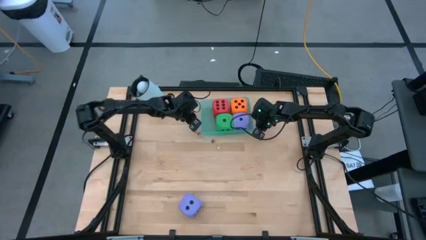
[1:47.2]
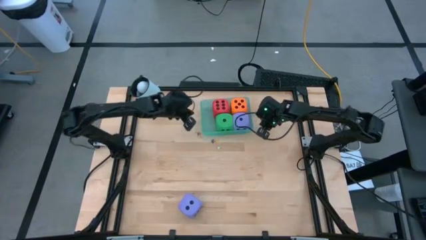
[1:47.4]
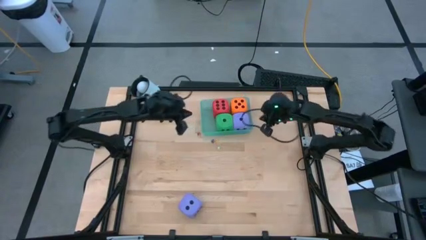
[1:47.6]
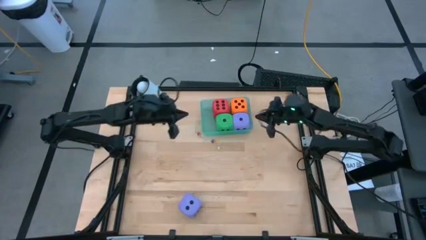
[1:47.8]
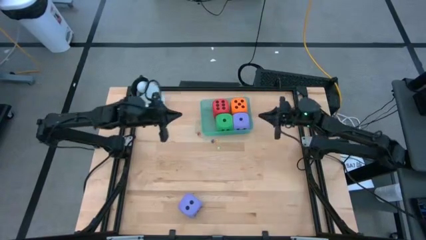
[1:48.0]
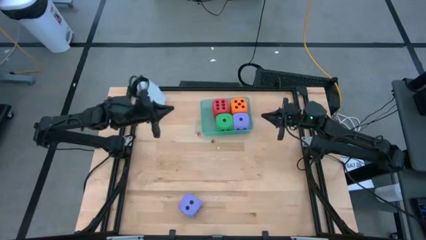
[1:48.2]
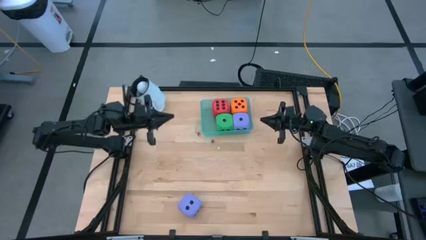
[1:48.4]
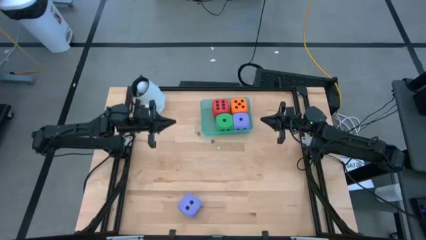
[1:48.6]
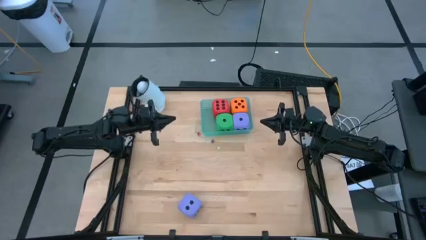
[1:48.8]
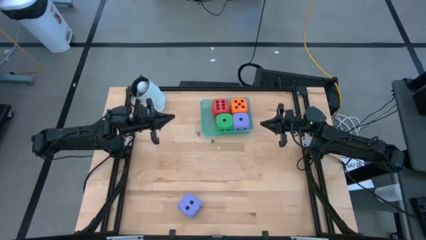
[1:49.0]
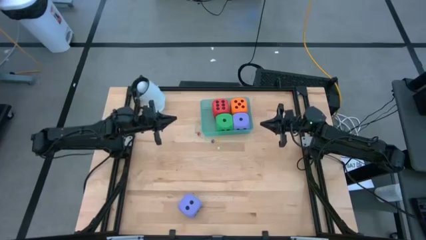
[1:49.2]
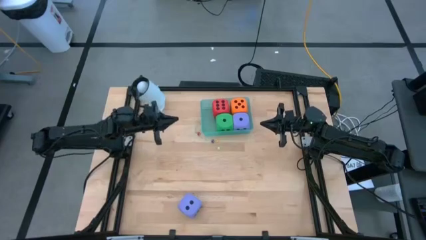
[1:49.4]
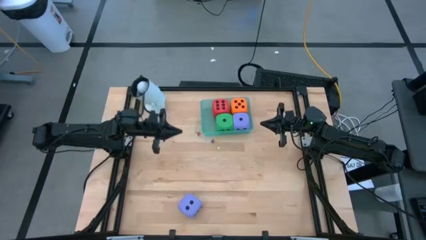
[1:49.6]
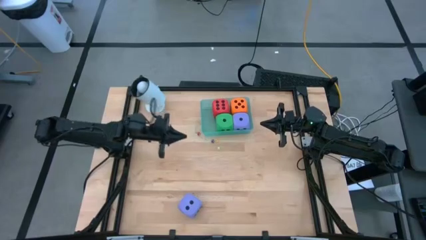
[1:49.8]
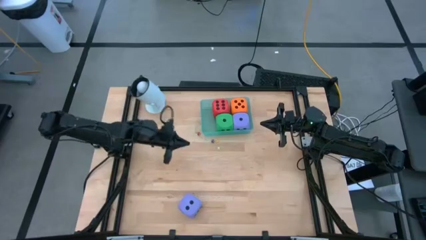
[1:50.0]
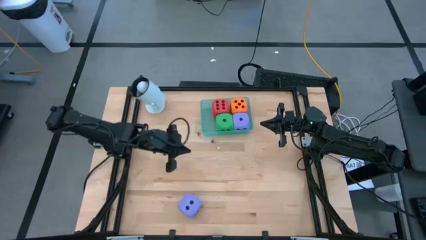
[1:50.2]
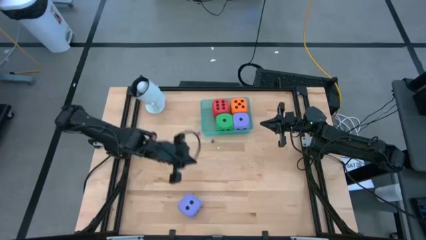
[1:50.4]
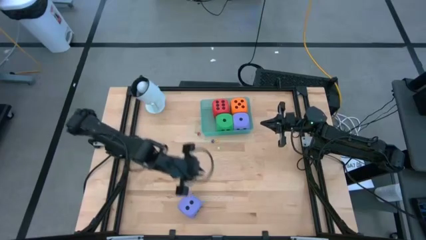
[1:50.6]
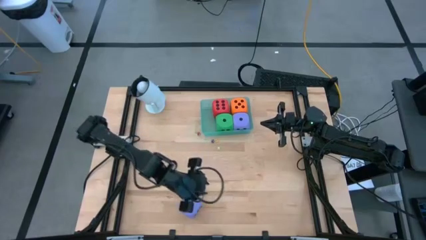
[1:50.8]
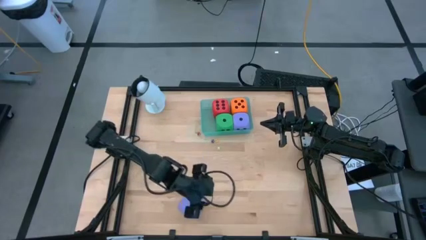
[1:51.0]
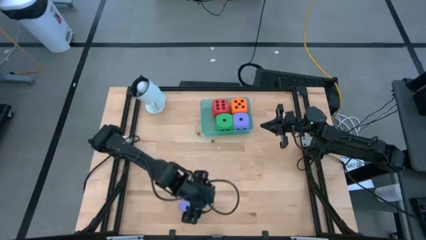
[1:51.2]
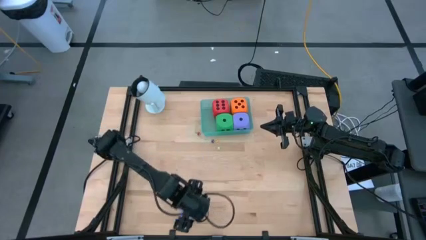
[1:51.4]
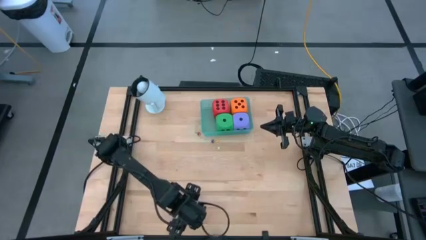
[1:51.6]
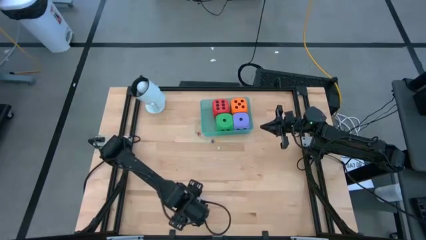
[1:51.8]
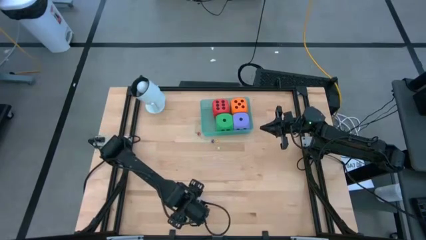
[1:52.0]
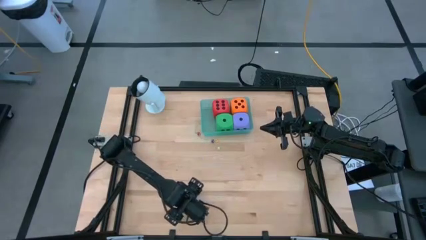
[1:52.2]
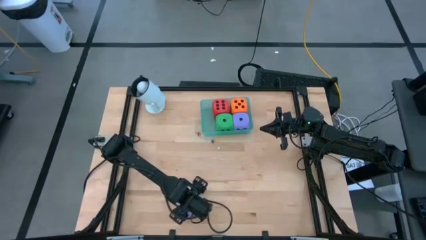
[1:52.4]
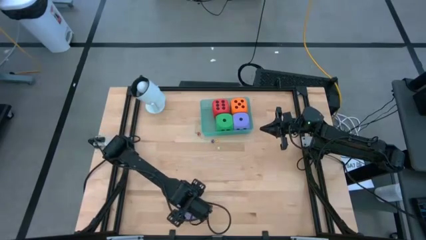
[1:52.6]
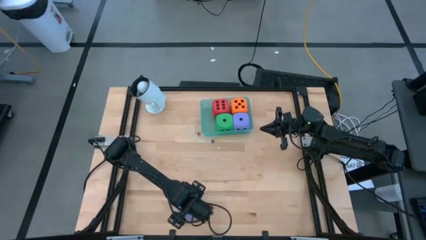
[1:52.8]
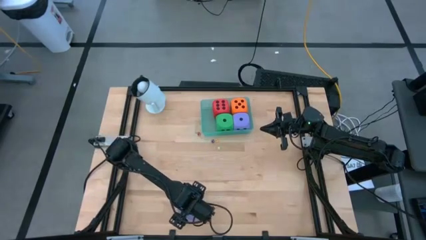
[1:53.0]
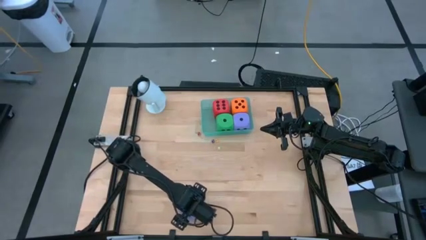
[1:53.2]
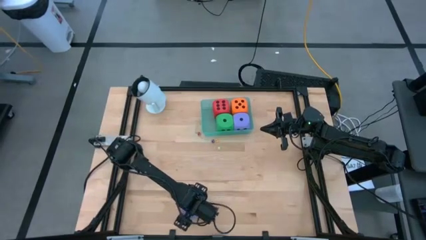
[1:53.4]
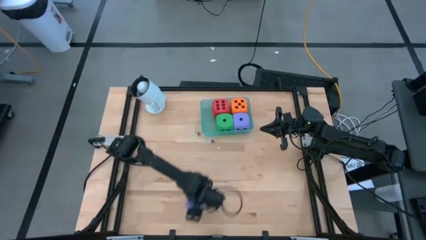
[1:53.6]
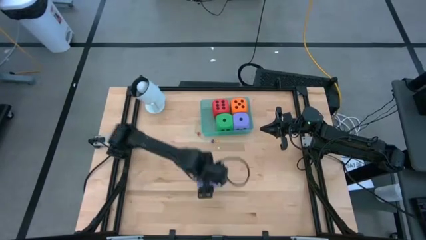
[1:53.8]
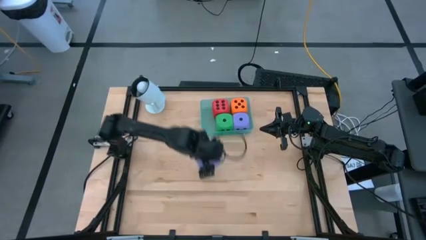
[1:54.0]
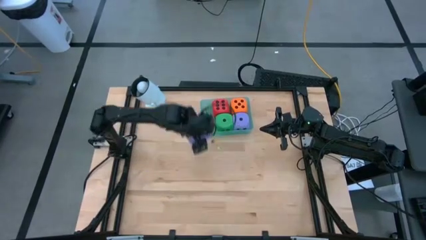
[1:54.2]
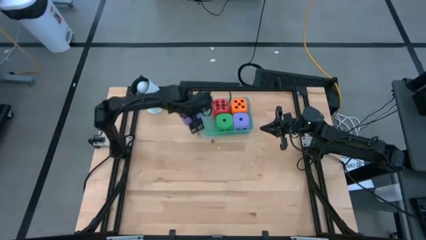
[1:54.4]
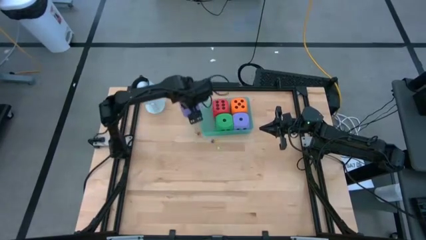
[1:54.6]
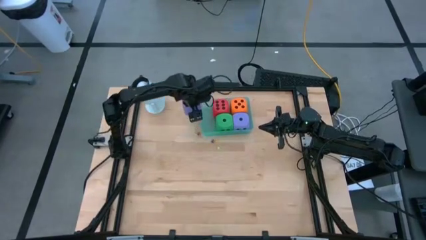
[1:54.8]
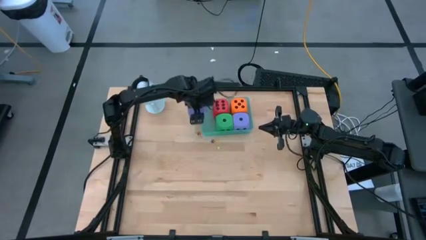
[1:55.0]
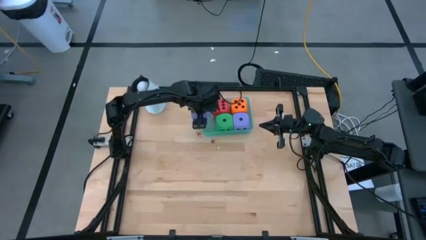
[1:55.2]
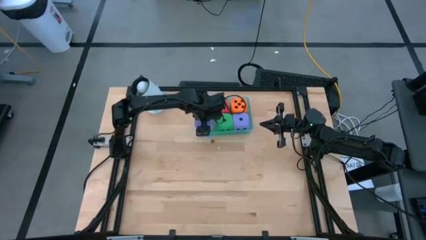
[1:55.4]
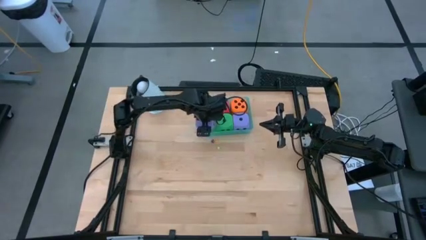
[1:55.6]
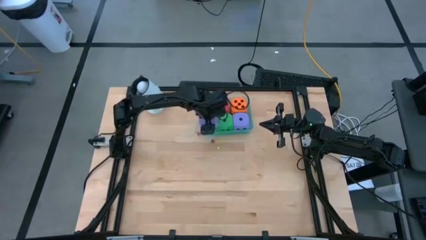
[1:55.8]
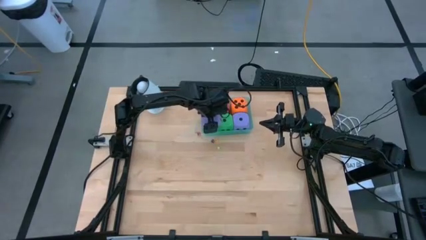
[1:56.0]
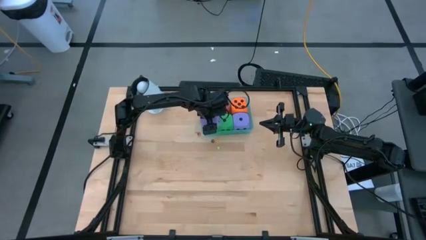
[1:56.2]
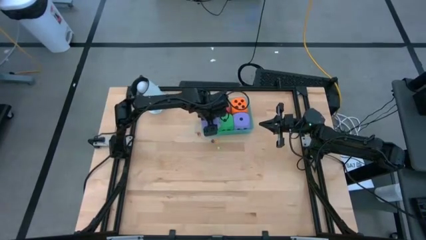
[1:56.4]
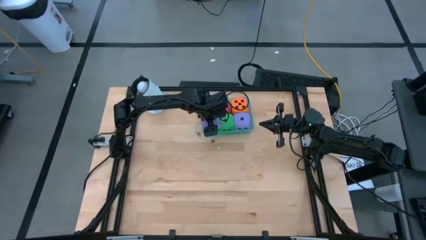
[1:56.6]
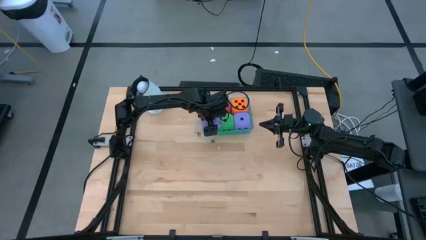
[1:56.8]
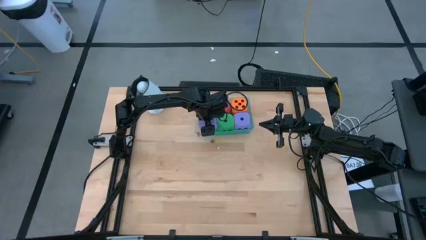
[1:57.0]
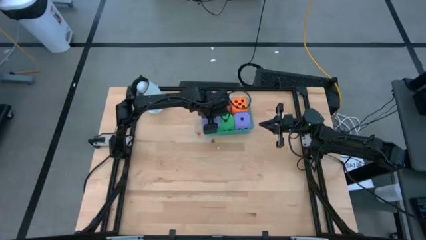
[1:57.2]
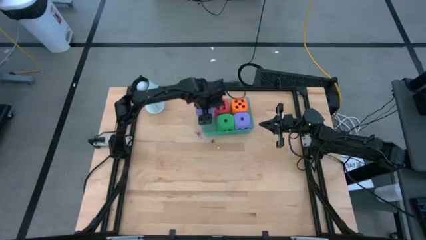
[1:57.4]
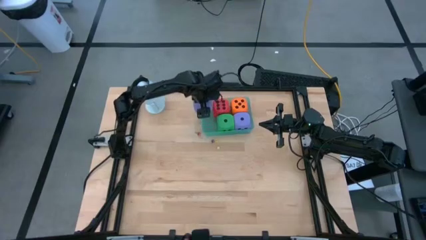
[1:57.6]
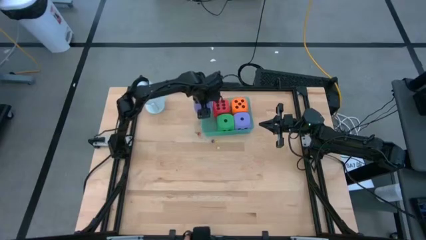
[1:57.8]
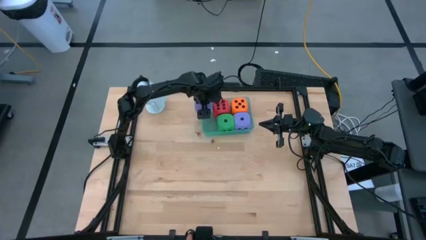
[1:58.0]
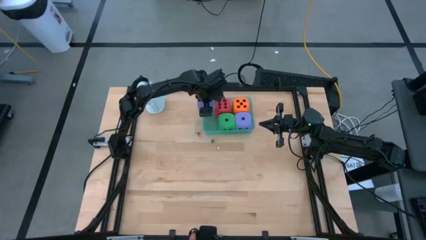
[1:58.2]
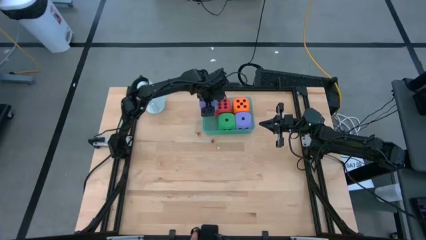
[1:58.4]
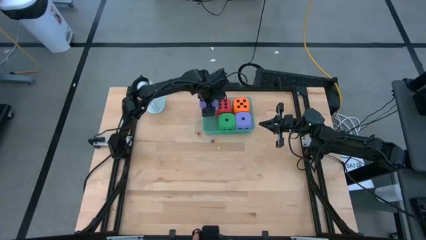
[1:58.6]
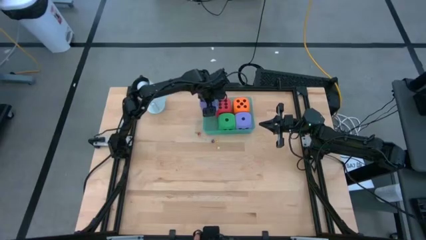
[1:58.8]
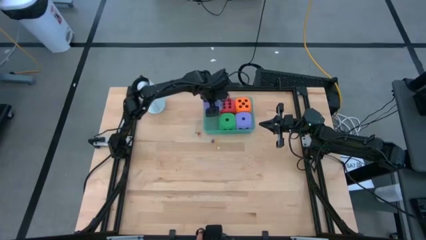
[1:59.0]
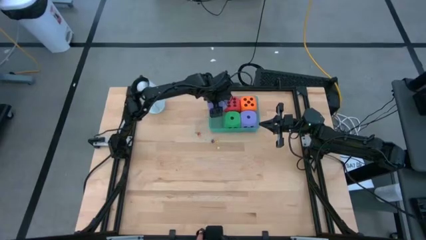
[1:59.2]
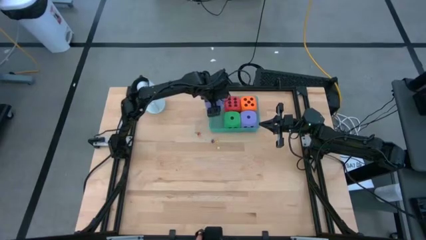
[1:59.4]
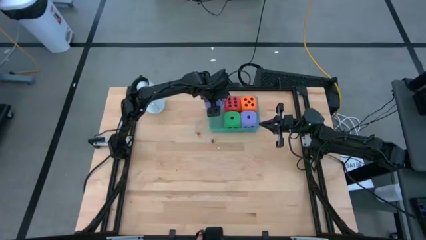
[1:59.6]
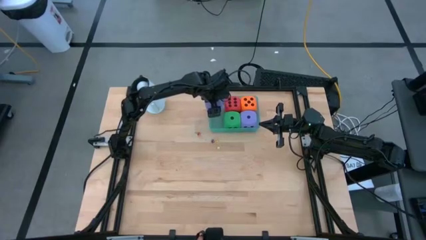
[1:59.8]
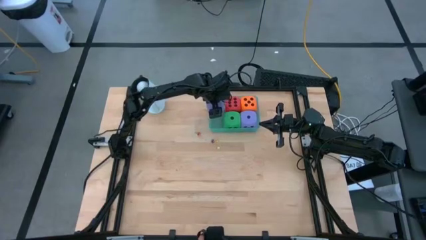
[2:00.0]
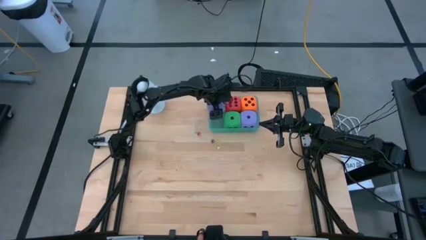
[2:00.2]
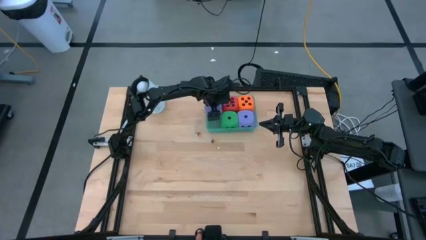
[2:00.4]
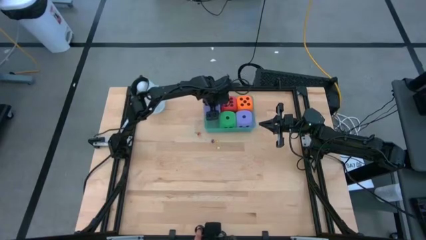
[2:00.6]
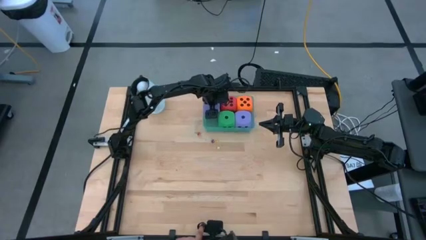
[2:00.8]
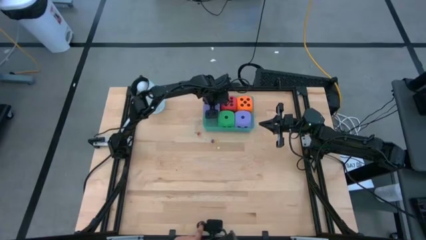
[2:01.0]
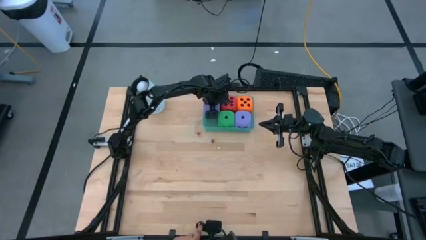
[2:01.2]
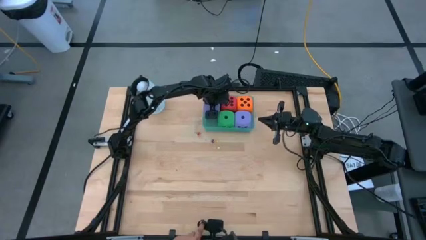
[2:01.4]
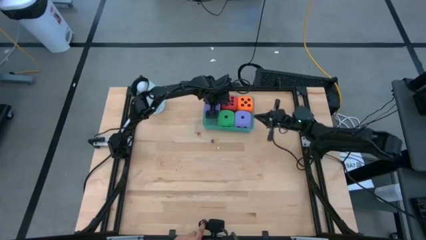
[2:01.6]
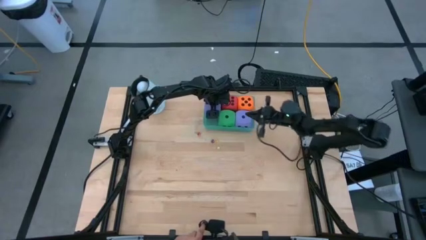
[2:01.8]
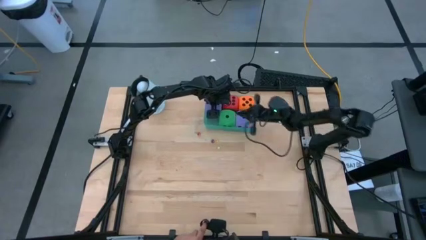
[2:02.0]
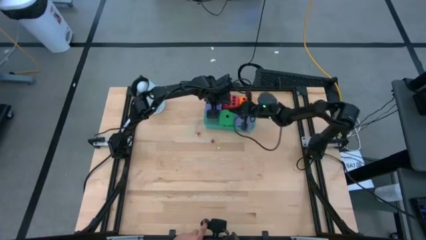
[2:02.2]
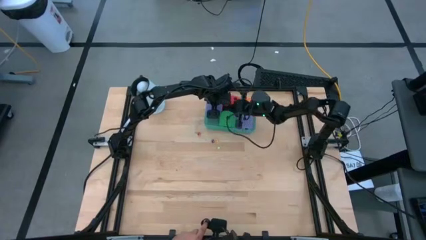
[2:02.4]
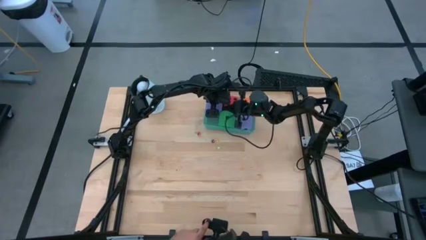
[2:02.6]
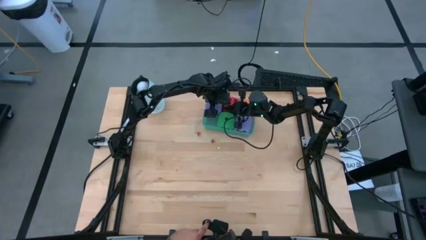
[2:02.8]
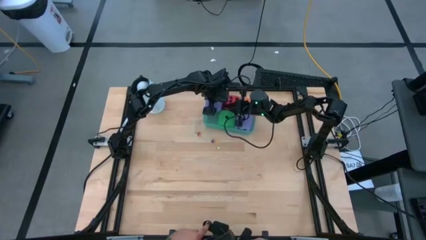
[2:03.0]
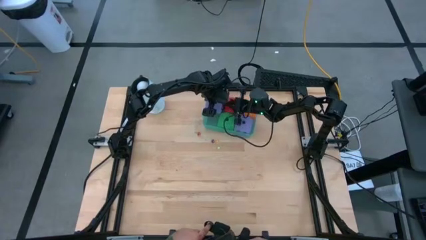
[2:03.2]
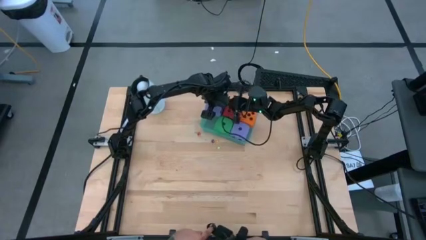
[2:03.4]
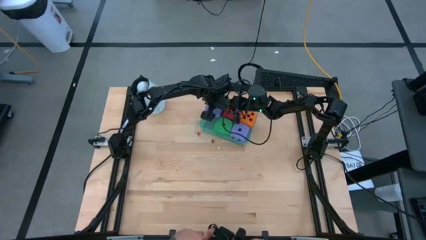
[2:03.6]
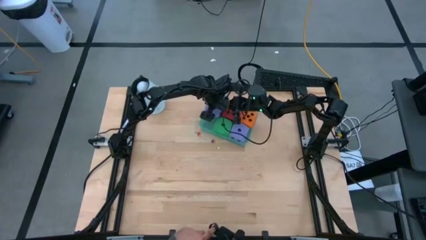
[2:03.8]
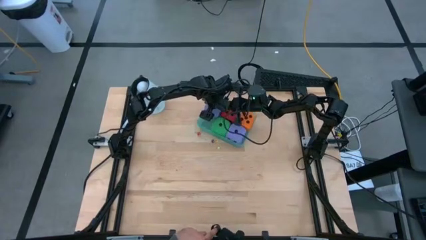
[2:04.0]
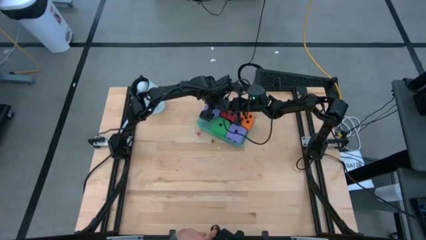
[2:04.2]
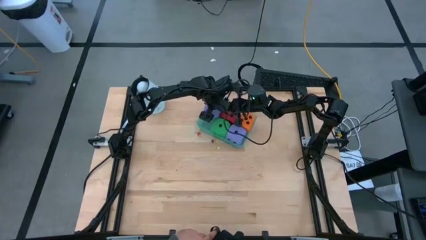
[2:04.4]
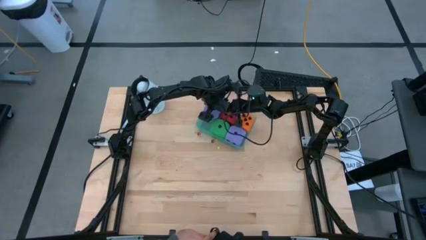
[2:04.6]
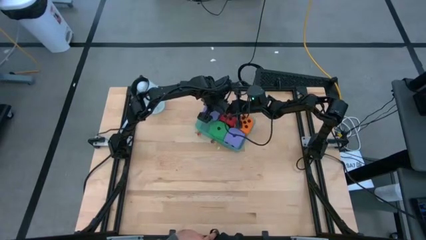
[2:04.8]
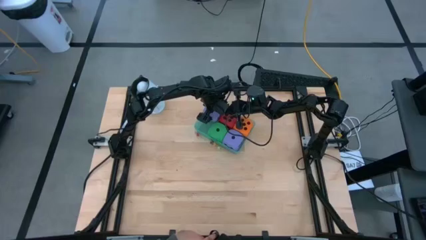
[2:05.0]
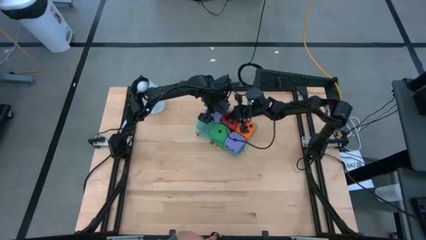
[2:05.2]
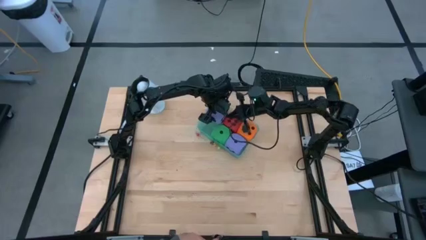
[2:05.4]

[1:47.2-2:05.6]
Task: Pick & Place Dice
Put the big purple dice into the bin
